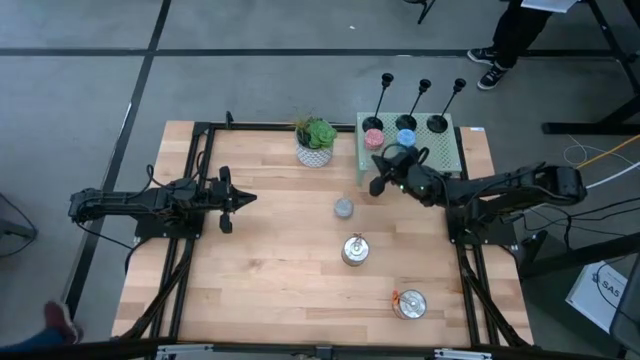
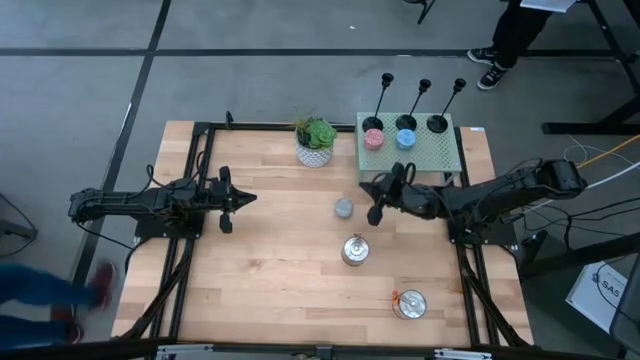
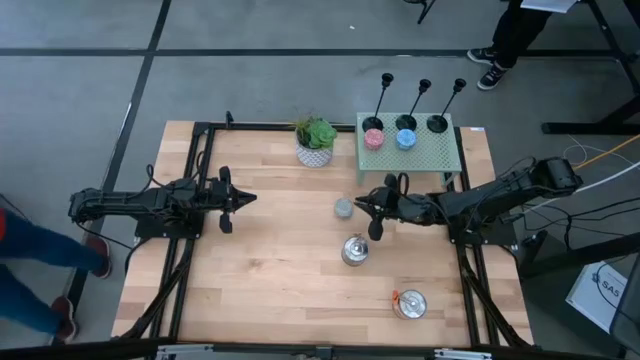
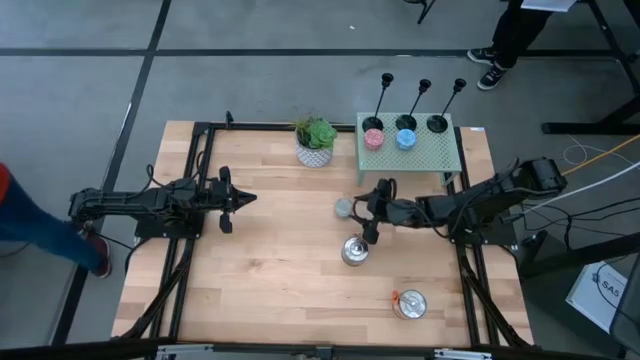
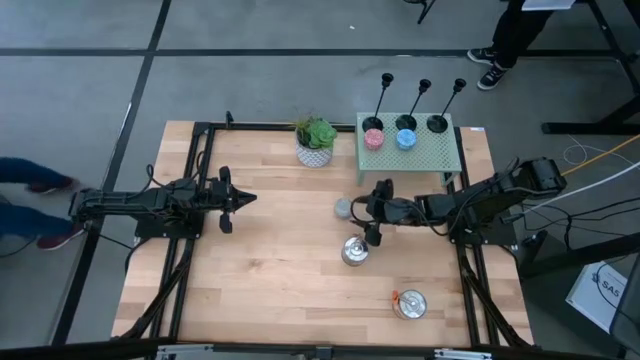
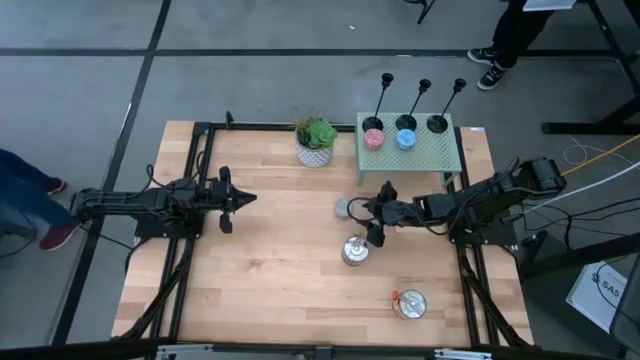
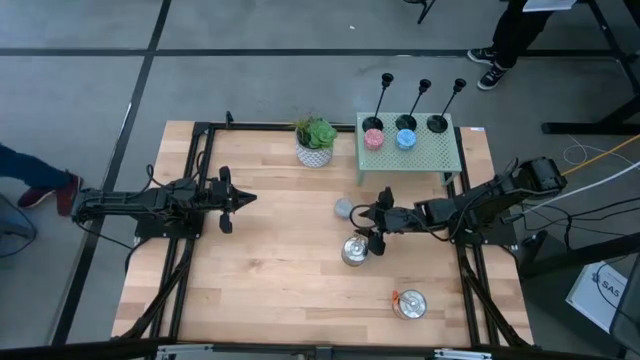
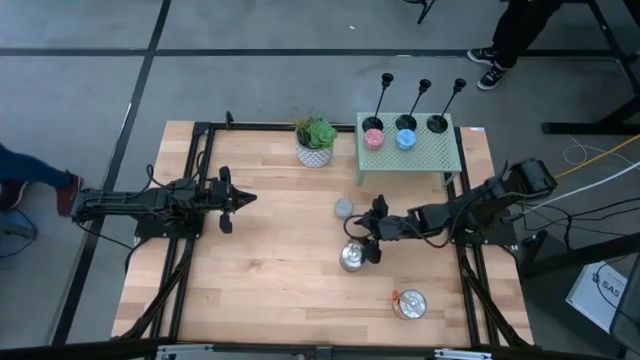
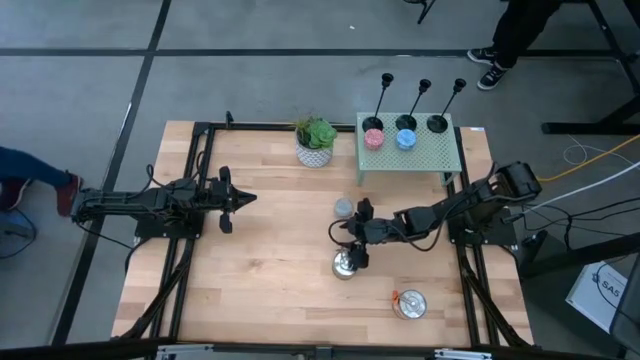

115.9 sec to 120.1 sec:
Task: Pick & Place candle stick holders
Adjust the silver scented candle can in the table

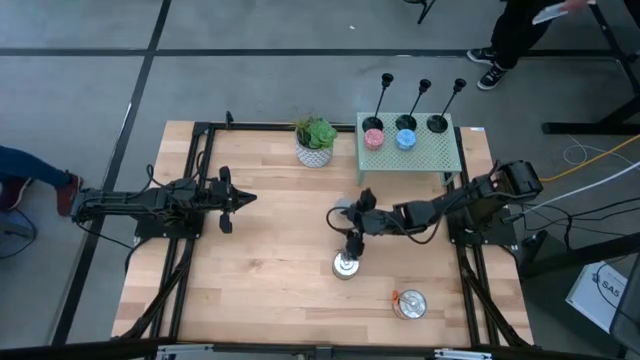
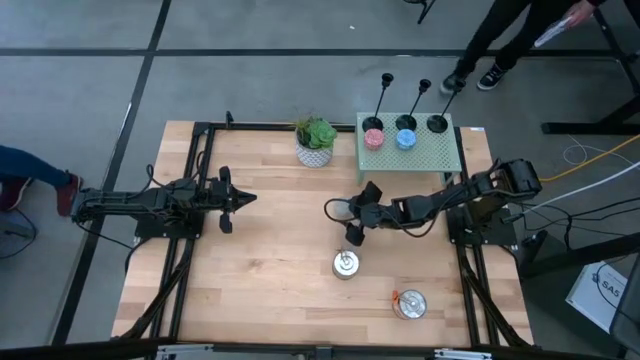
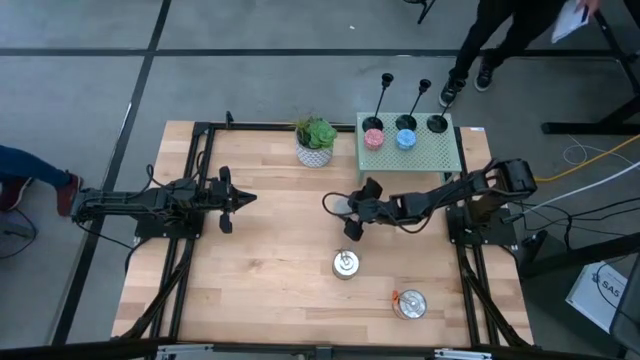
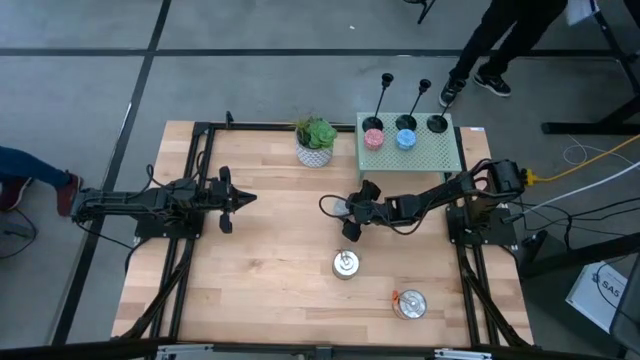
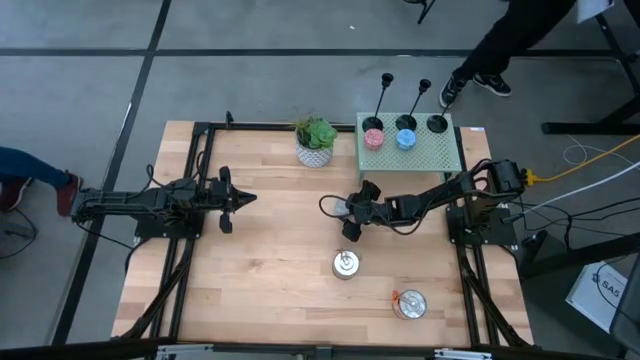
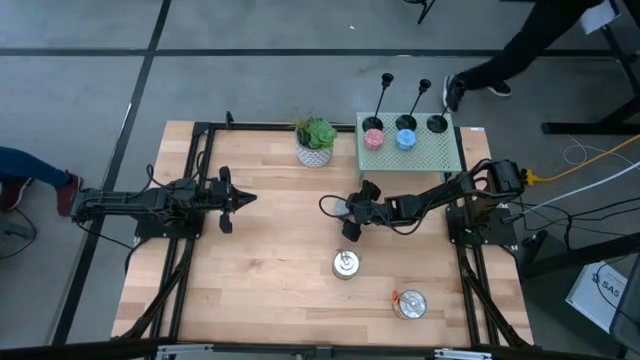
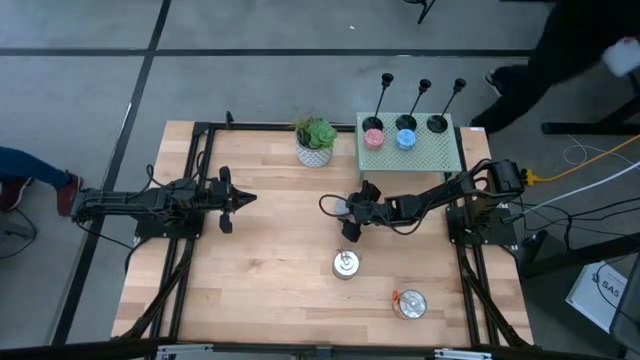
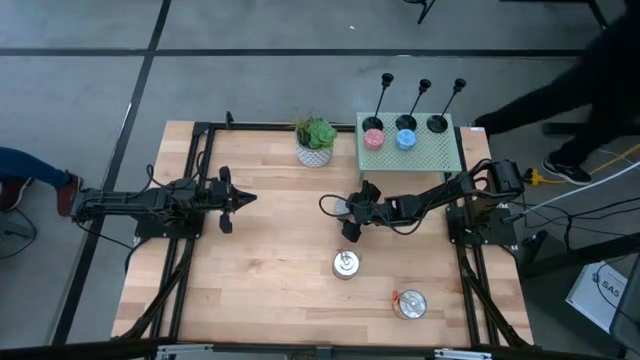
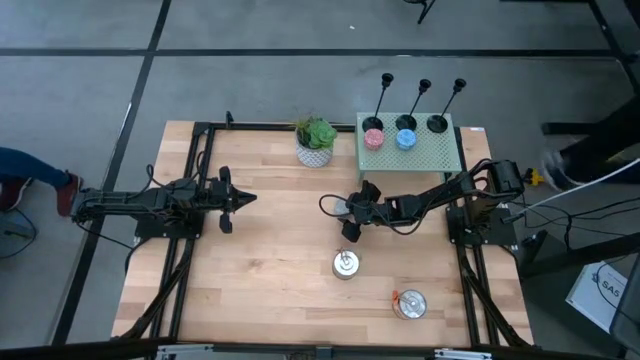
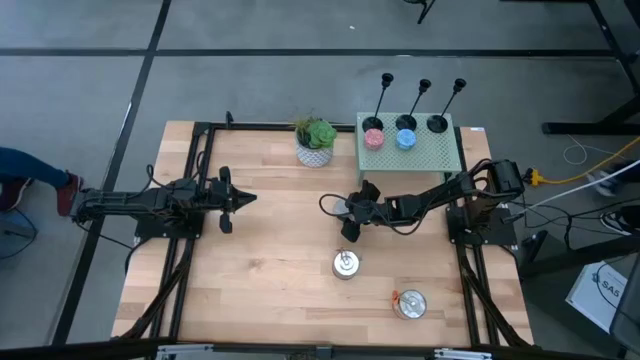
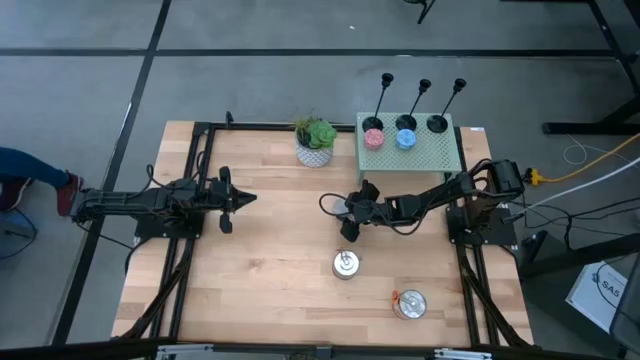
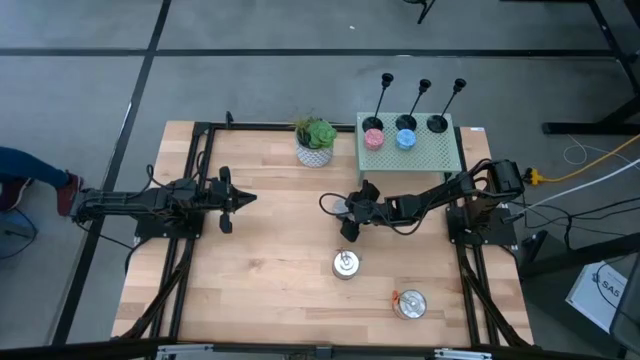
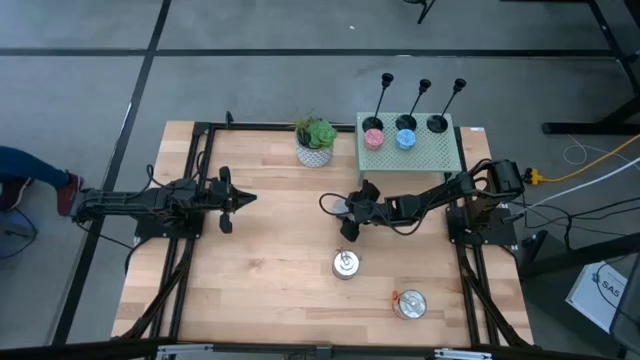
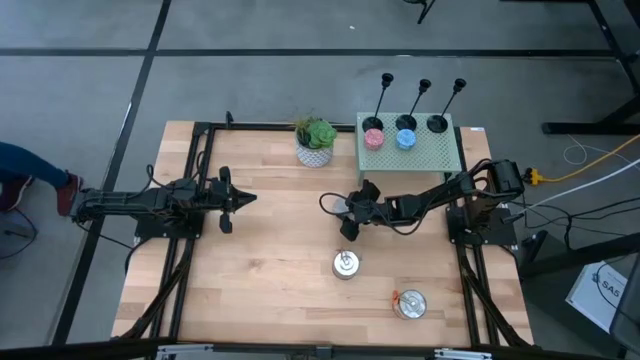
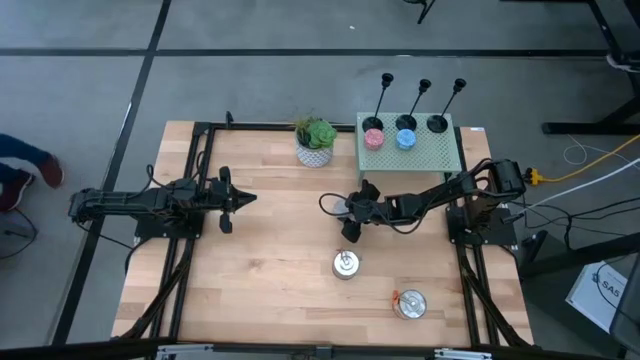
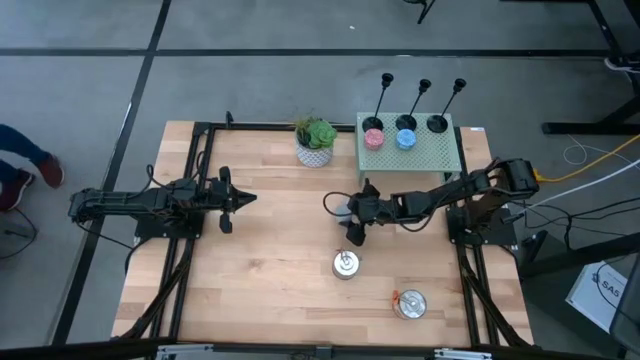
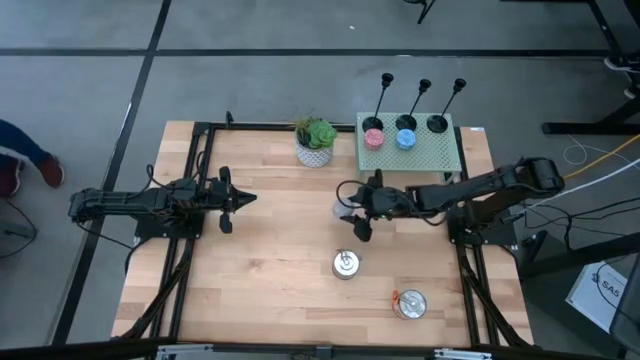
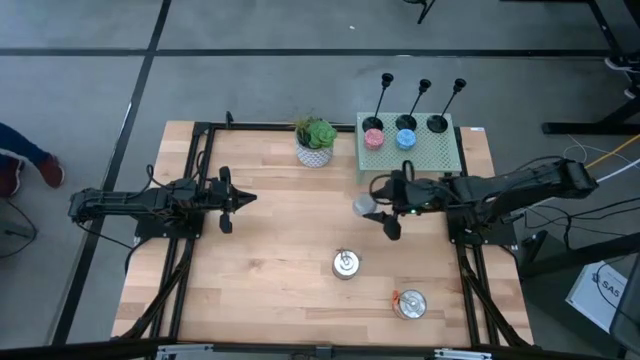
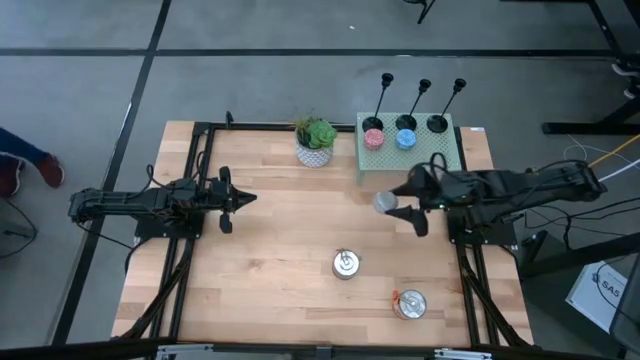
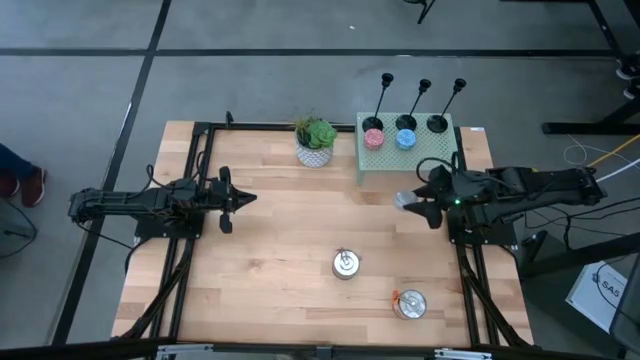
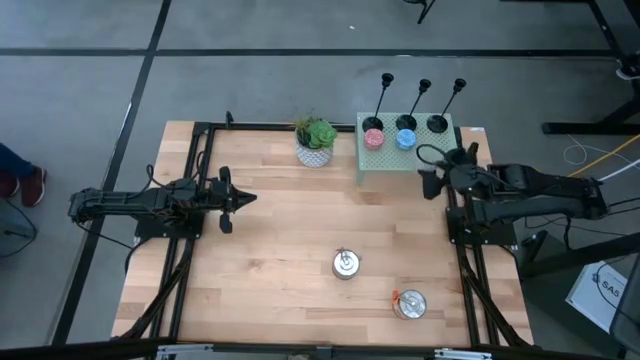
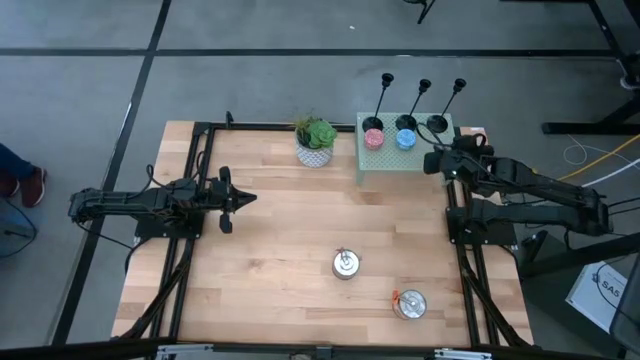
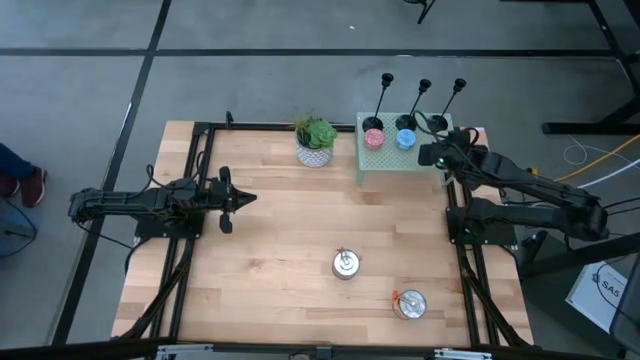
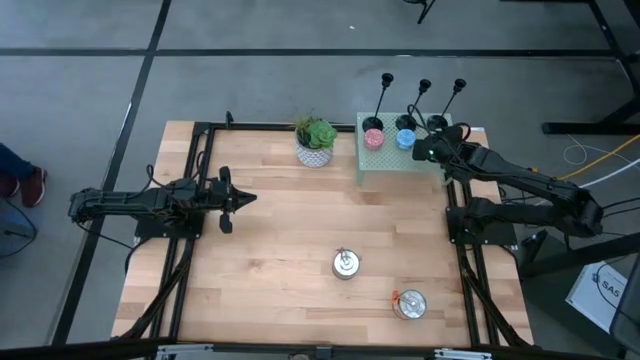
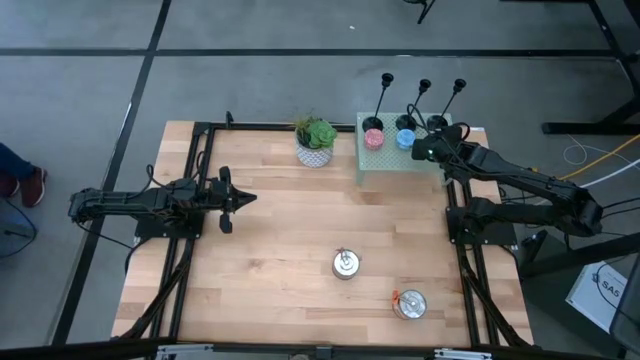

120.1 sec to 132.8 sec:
Put the blue yellow scented candle and aligned with other blue white scented candle on the shelf

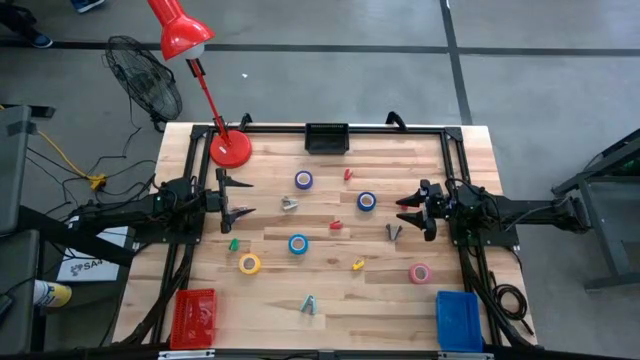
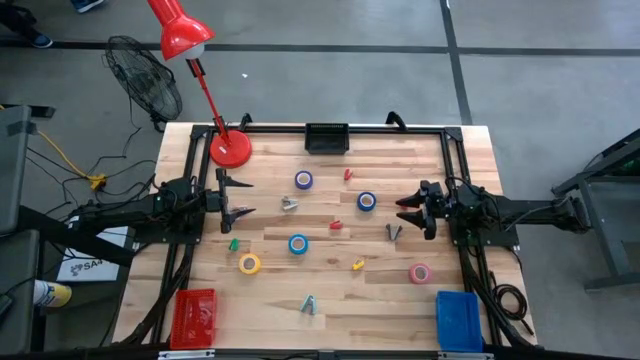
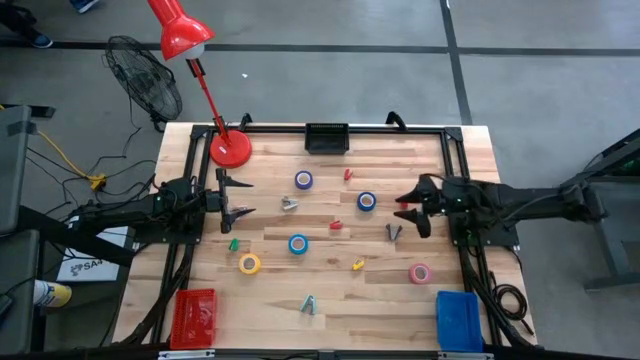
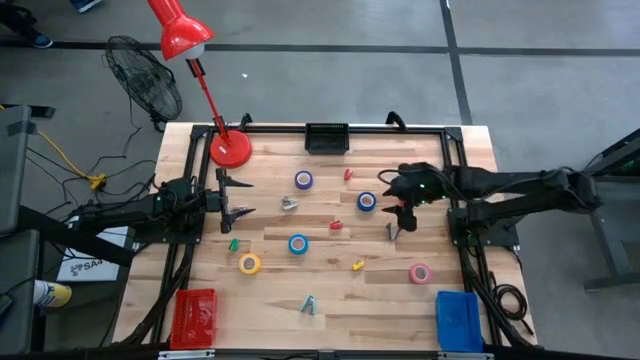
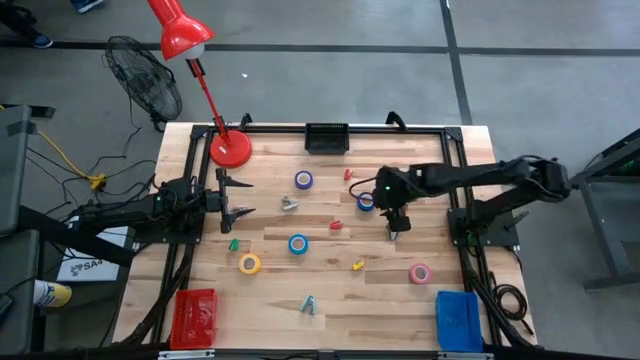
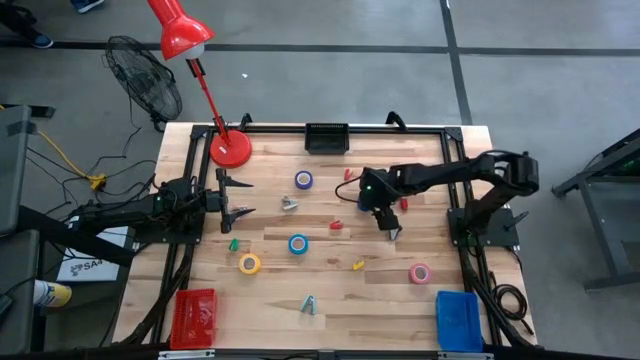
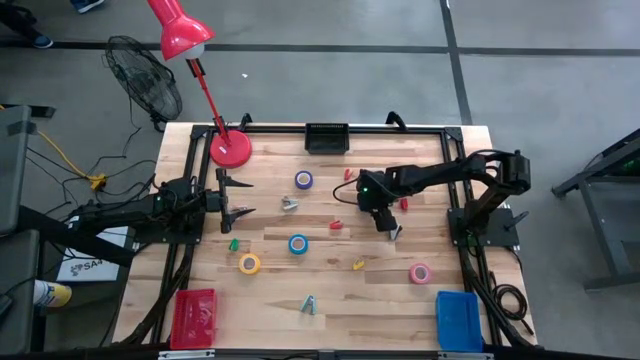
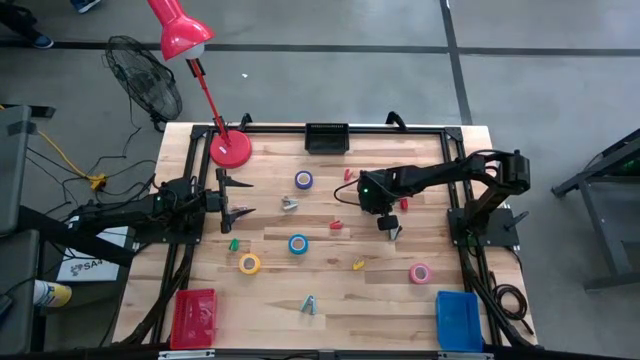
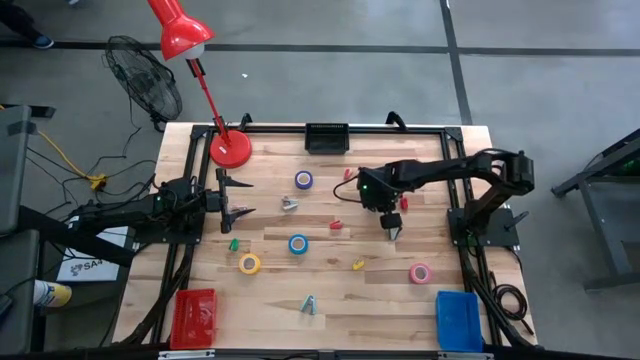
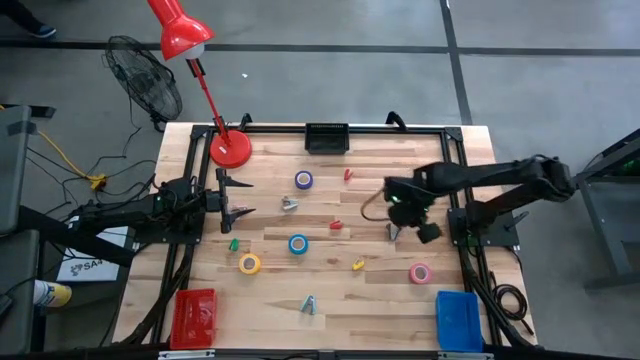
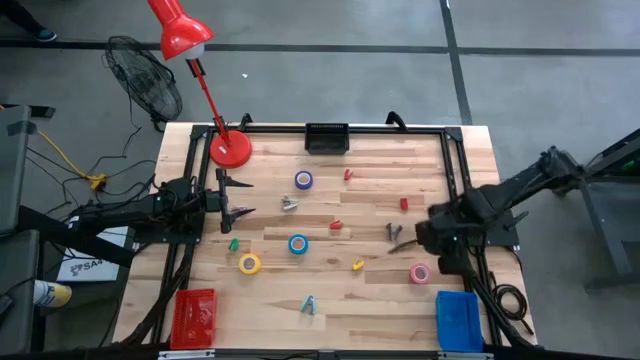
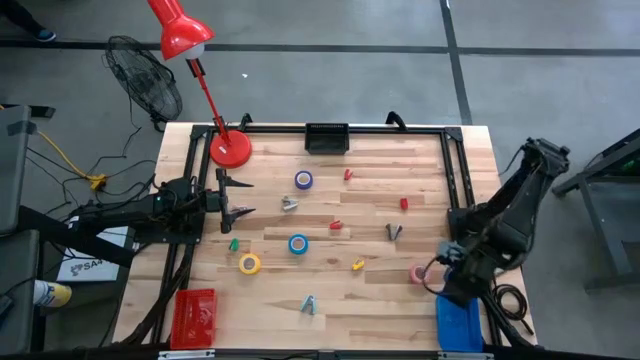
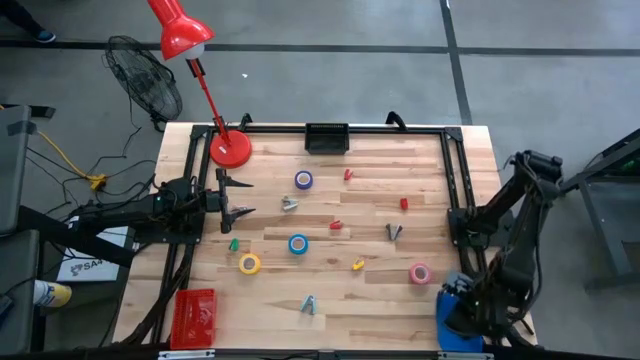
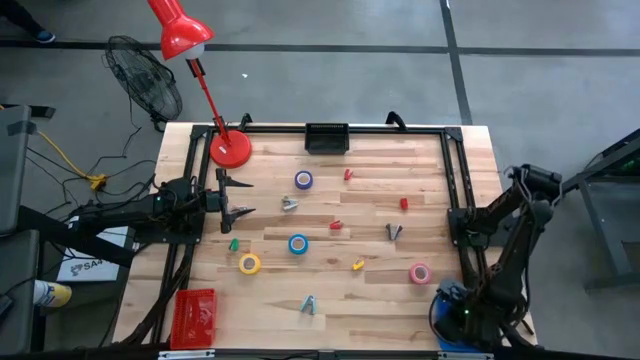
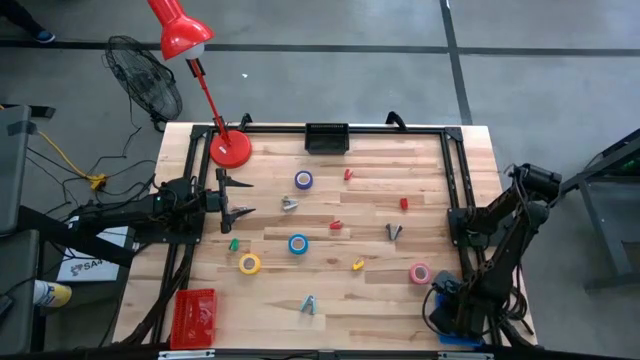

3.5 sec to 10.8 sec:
Task: Pick and place Stapler, Stapler remover, tape
Put the dark blue tape into the blue basket
